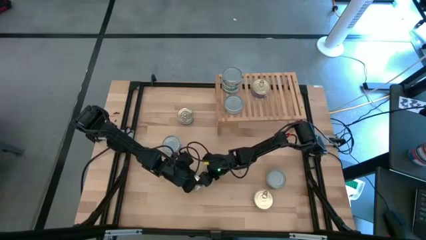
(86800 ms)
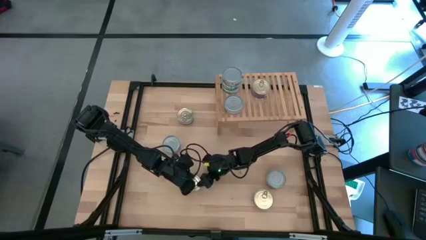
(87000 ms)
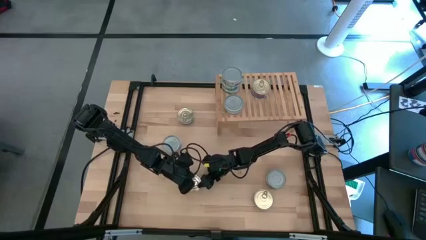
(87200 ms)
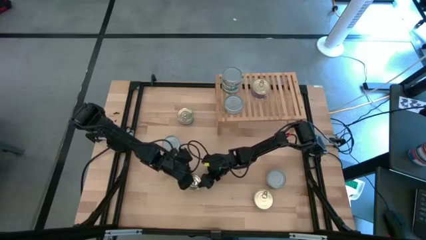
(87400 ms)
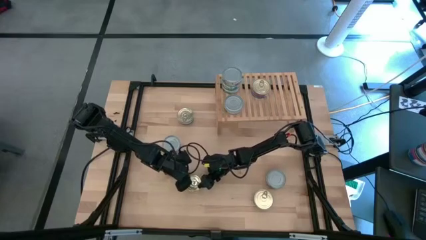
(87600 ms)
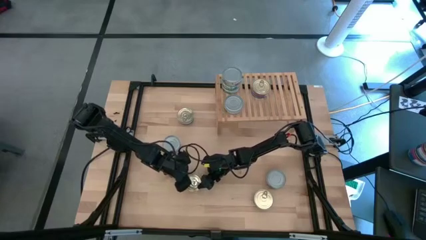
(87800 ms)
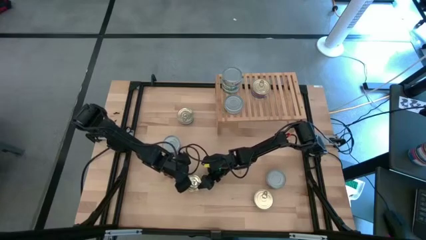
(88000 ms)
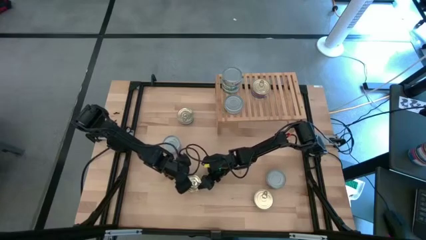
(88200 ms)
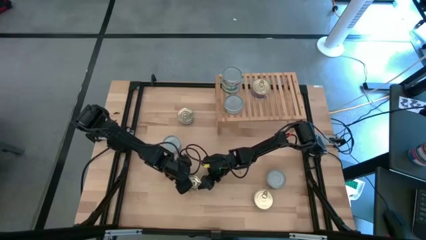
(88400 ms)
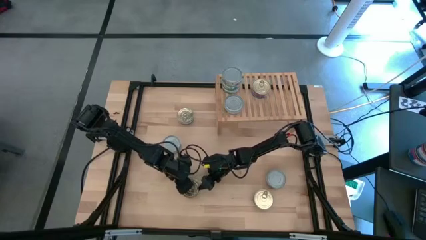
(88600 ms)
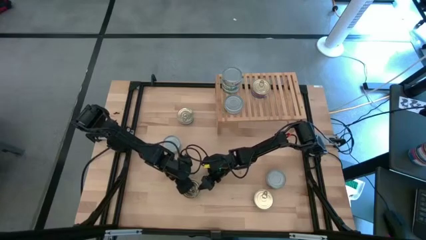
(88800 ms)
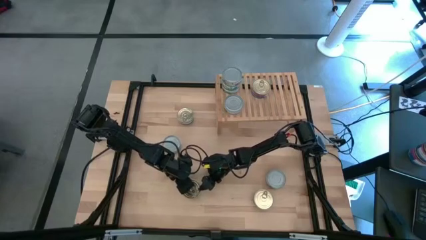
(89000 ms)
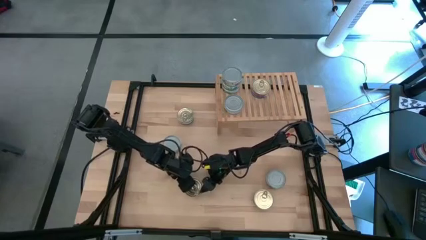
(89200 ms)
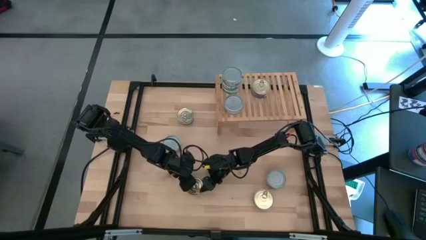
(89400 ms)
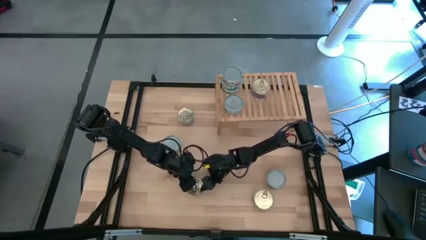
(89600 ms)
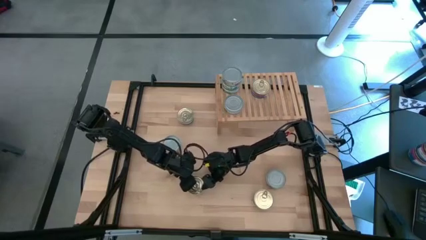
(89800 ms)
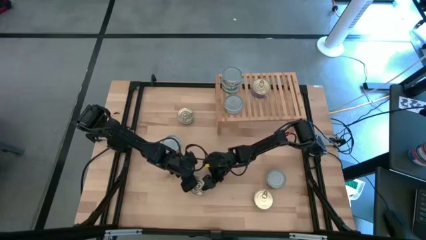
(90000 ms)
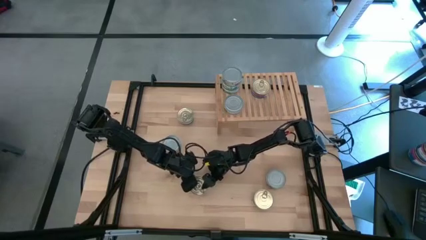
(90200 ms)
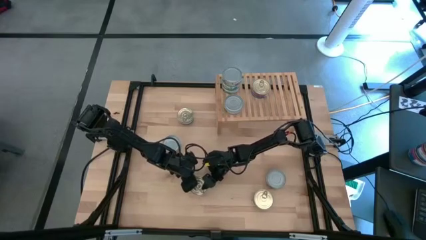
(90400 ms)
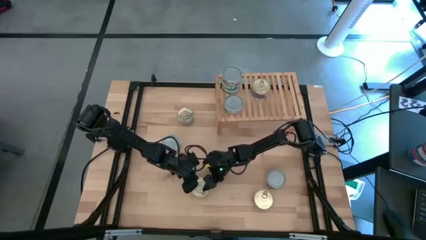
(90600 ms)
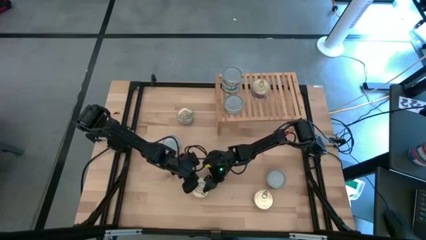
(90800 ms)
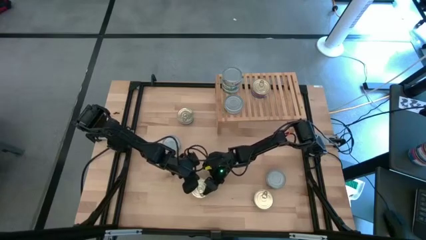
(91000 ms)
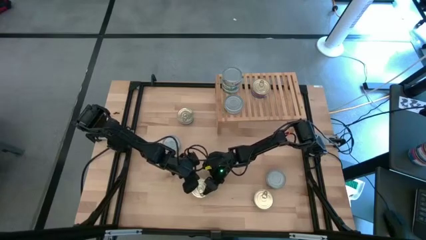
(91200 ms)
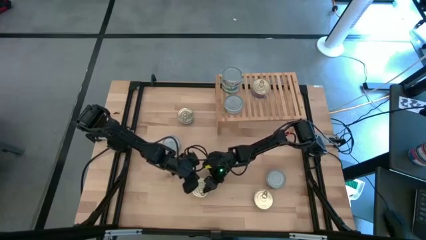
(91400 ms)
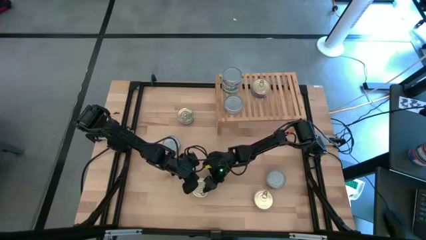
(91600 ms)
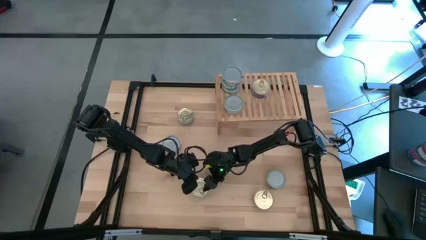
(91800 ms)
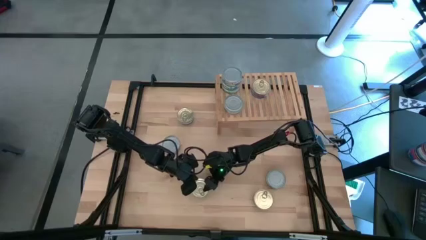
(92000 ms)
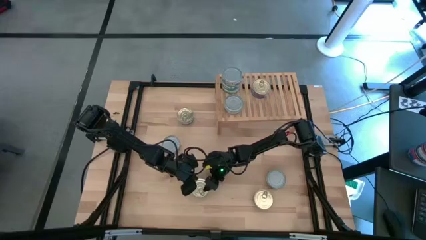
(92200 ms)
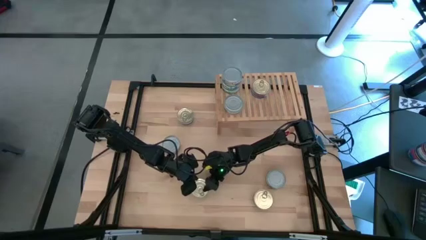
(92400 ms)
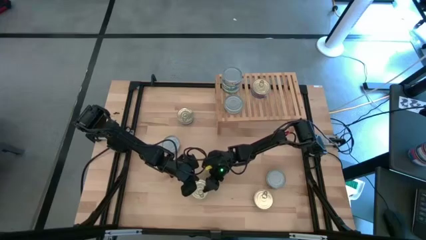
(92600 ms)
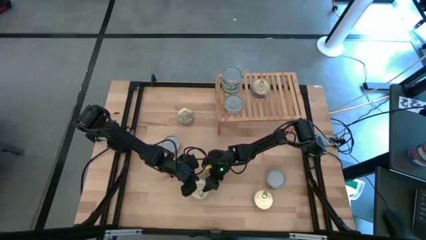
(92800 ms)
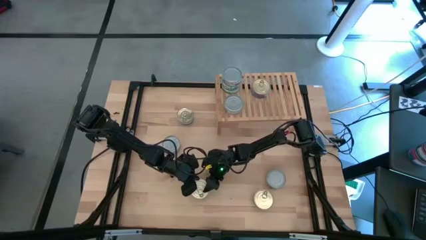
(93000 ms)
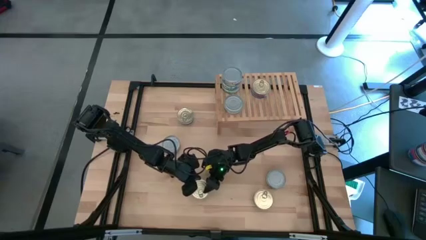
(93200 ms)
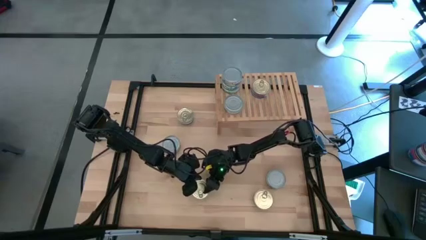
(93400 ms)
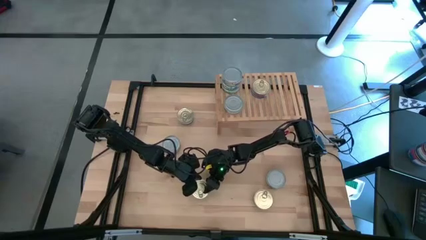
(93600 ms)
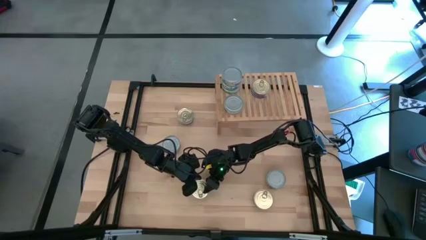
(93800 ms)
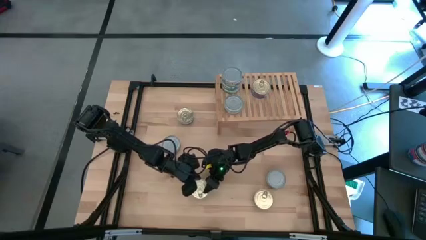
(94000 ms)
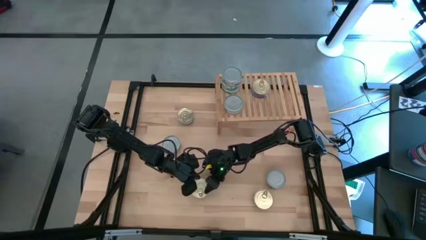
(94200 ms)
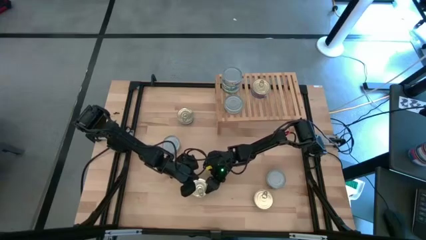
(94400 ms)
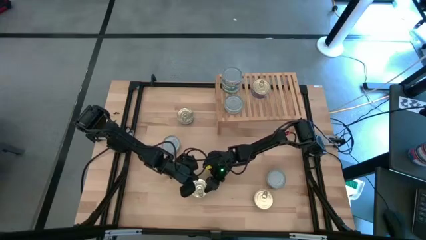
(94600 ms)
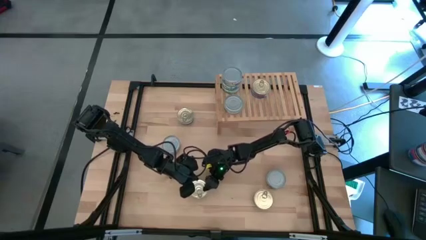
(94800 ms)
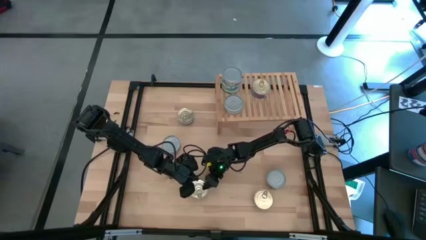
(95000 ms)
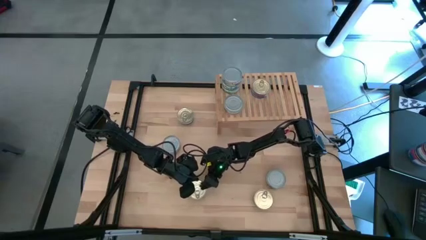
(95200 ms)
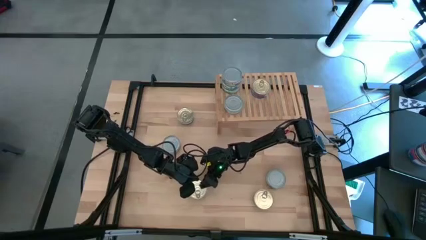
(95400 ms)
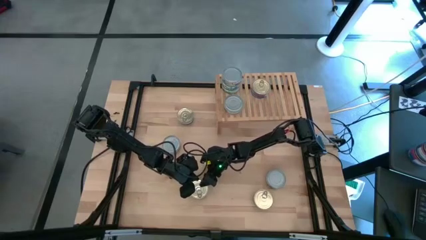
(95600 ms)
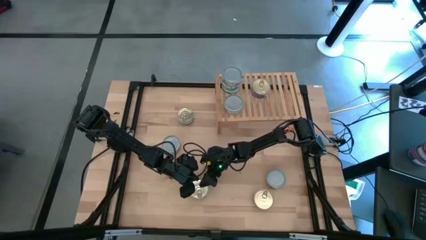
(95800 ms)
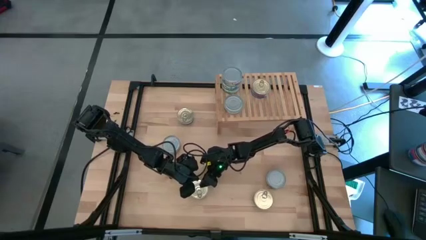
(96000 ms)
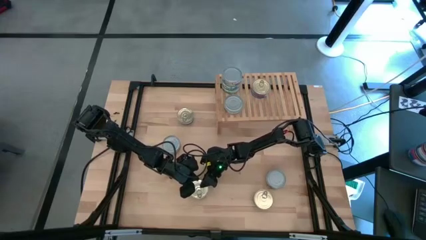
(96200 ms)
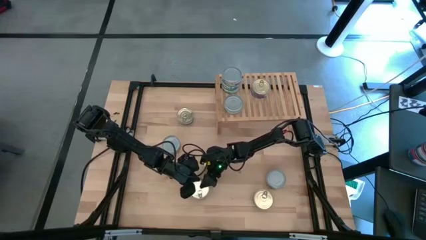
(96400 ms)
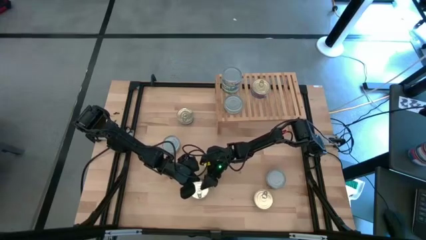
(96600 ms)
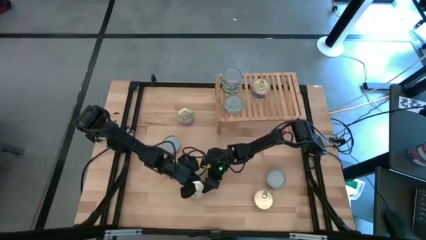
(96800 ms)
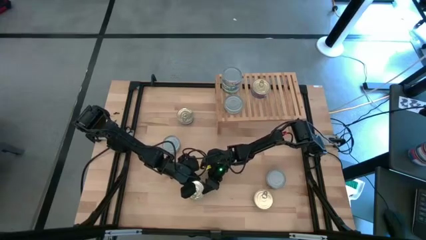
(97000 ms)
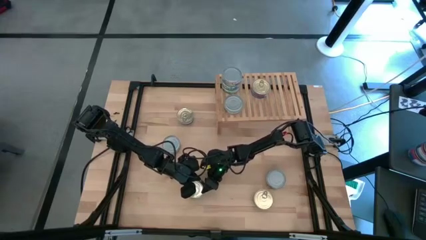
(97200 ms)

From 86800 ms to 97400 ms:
Task: Stack canned seafood by type on shelf
Stack the blue pink tuna can on top of the blue pink tuna can on the shelf

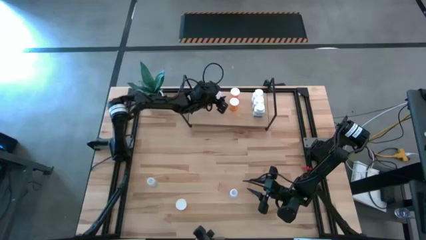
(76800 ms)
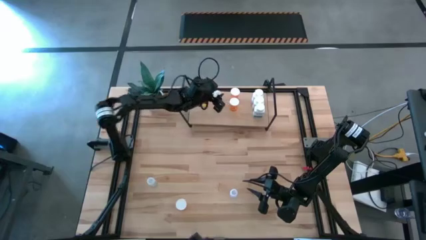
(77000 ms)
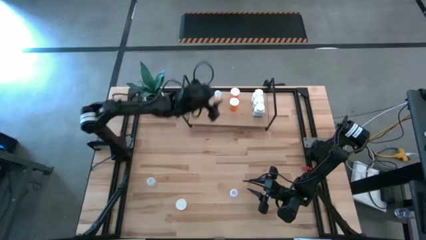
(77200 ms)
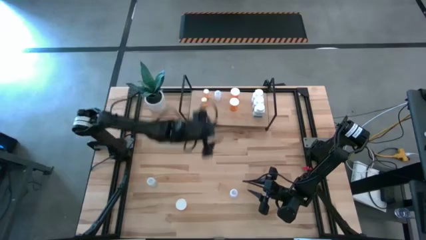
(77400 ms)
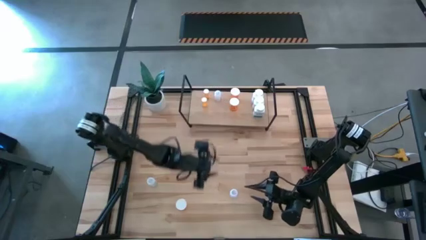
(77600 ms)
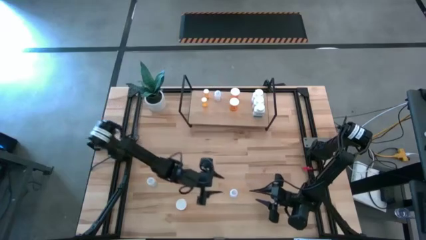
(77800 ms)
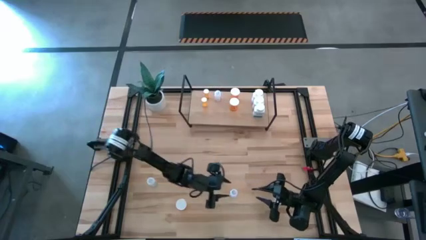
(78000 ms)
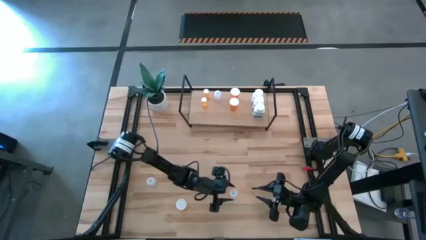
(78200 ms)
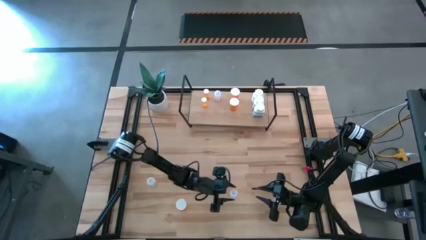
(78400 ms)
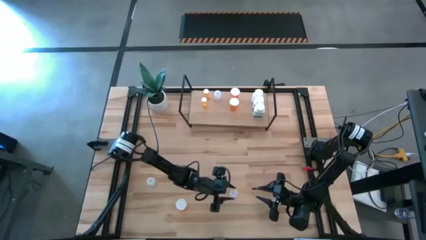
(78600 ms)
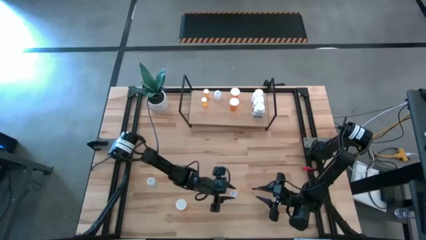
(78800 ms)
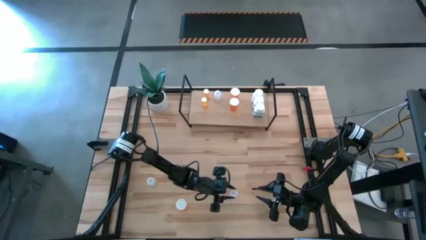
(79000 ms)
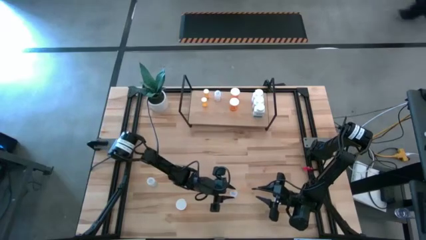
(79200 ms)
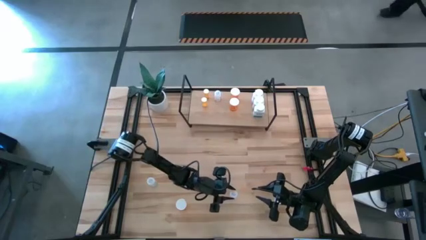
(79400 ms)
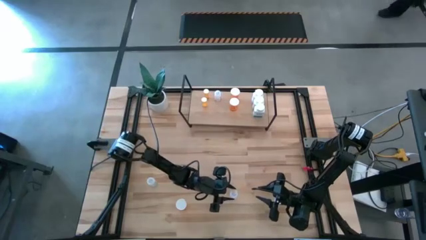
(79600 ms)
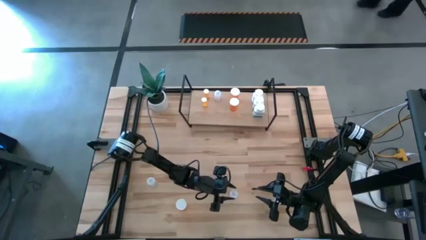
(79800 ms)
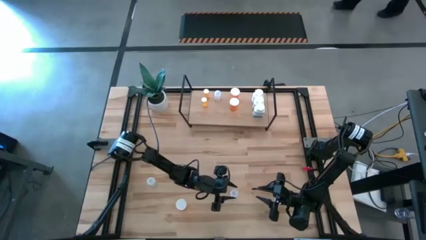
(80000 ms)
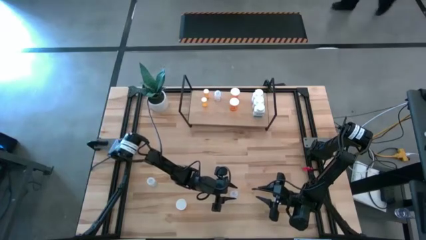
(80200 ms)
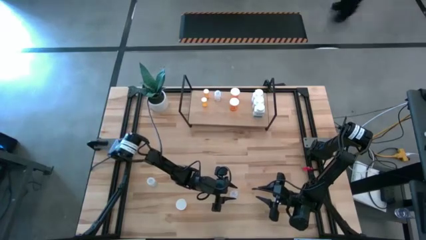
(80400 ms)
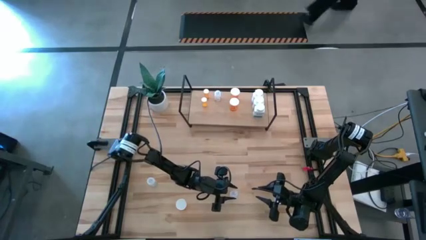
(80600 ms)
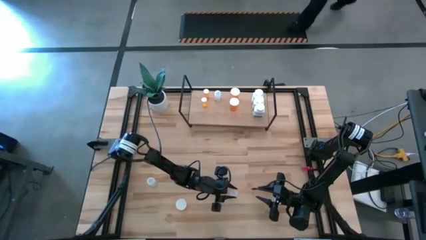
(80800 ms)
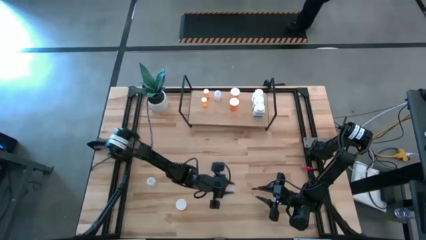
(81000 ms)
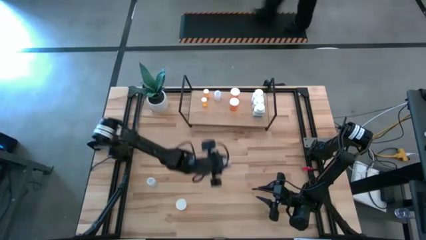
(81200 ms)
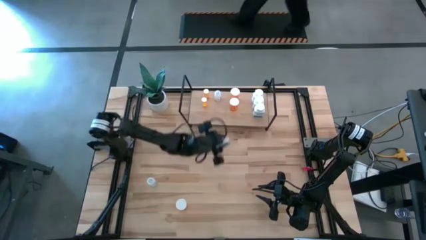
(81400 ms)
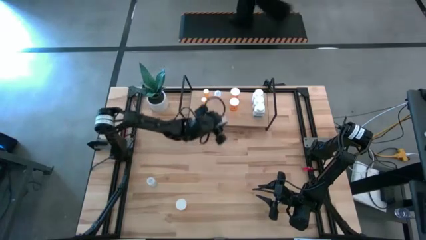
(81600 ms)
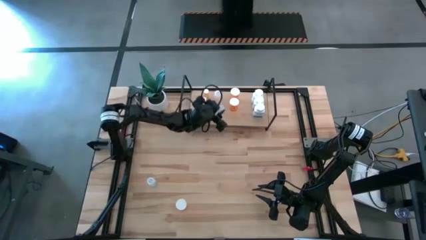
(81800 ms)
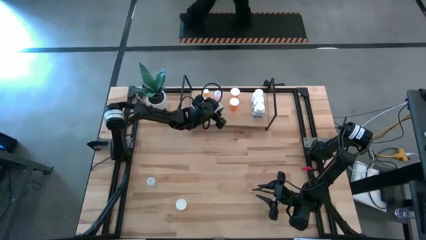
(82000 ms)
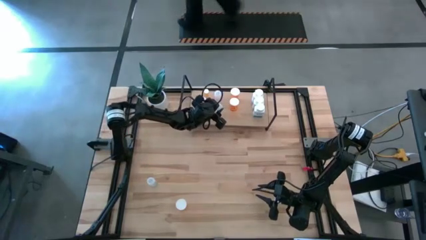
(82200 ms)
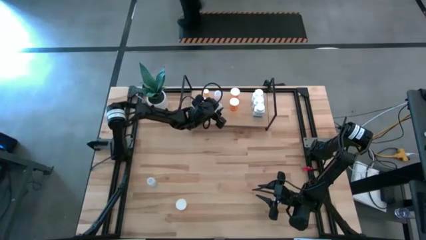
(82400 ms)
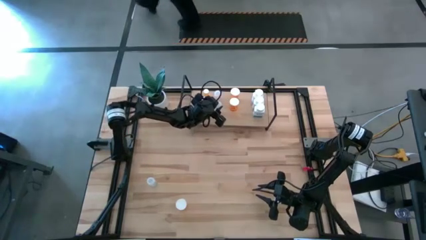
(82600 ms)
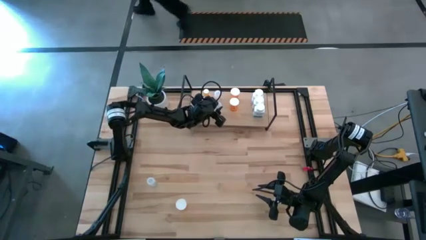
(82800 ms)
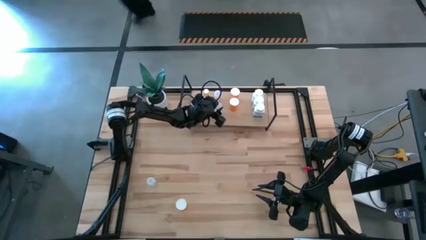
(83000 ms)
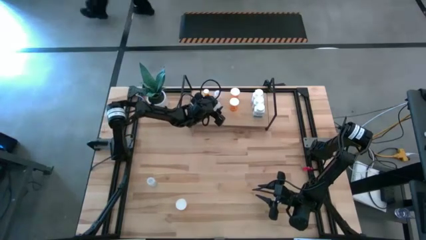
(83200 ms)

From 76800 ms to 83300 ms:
Task: Pick and place medicine bottles onto shelf by color
Put the bottom transparent medicine bottle on the shelf aligned with the other transparent medicine bottle
